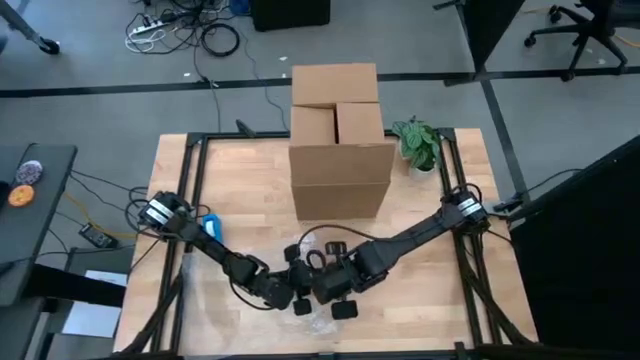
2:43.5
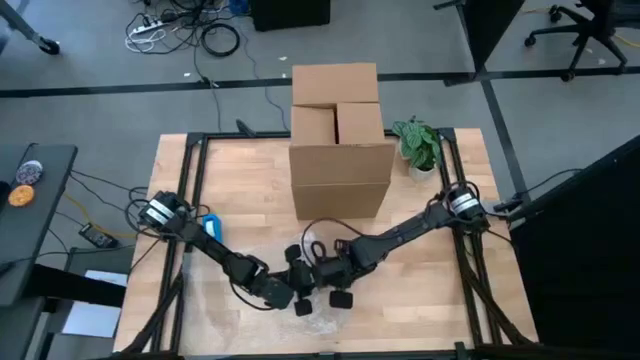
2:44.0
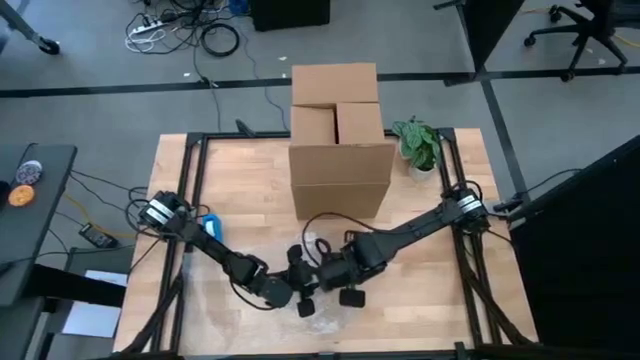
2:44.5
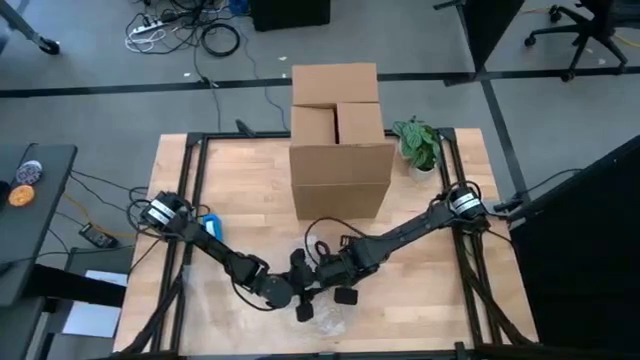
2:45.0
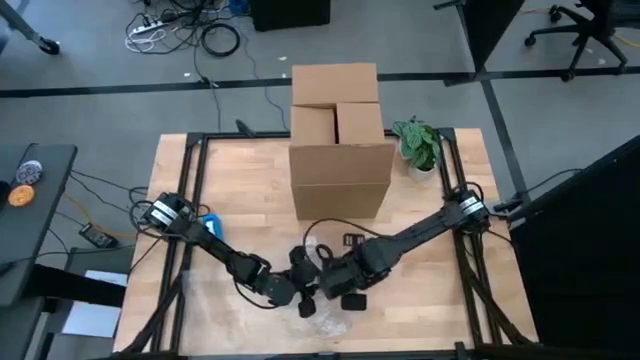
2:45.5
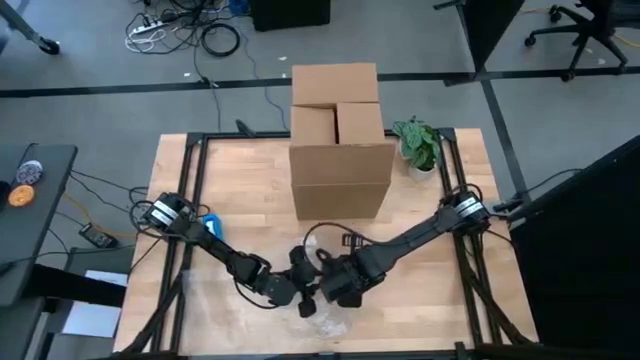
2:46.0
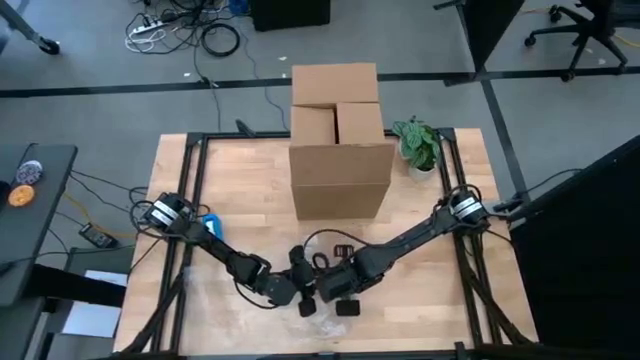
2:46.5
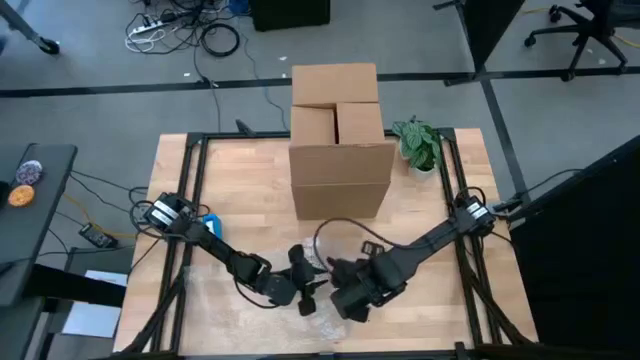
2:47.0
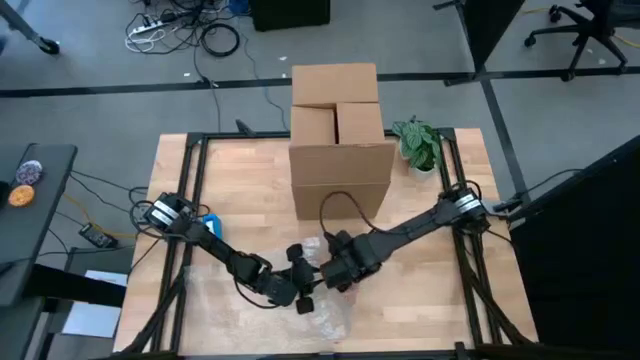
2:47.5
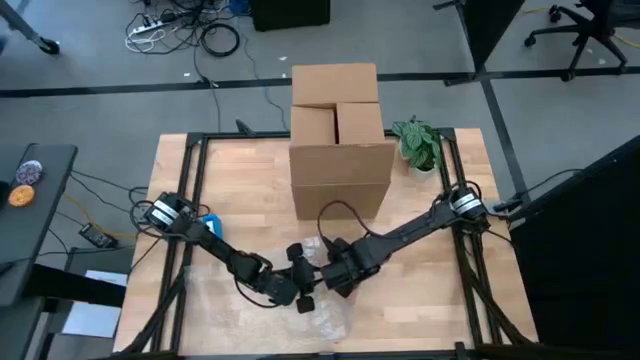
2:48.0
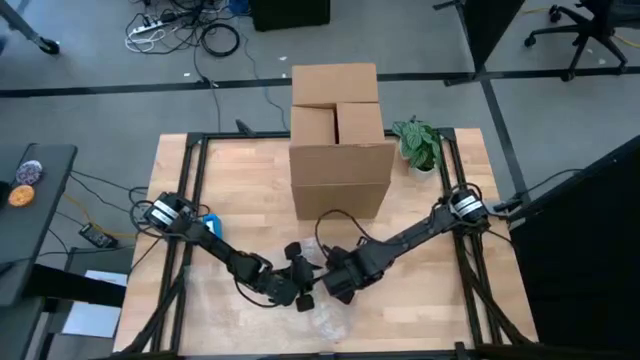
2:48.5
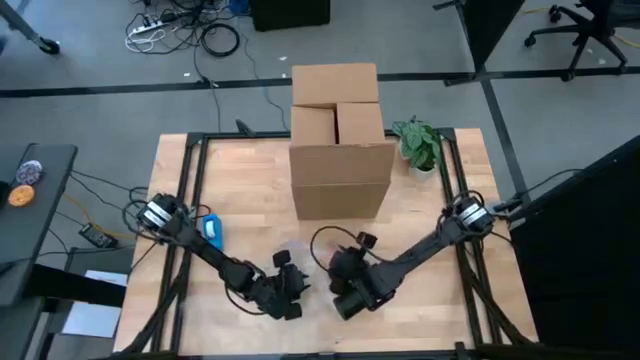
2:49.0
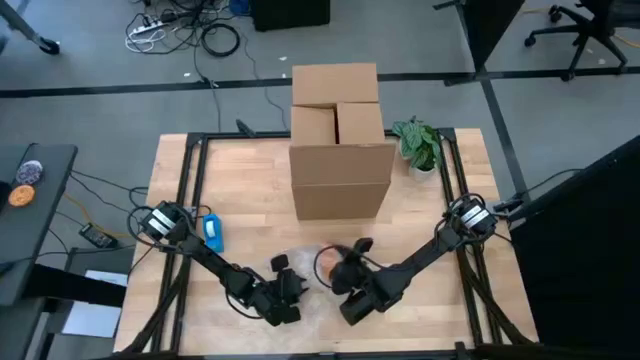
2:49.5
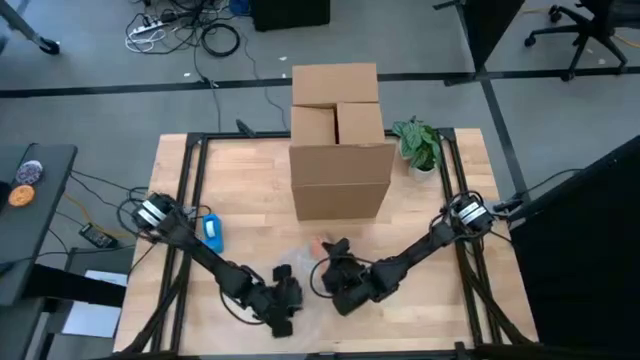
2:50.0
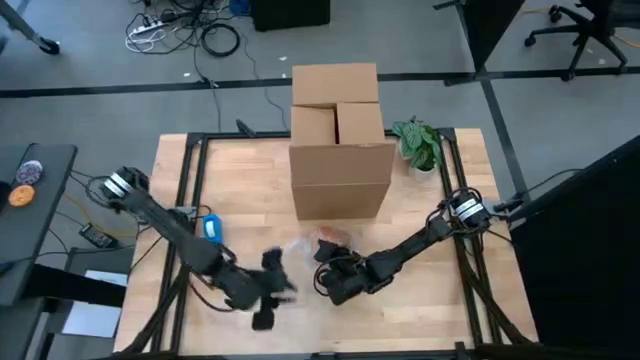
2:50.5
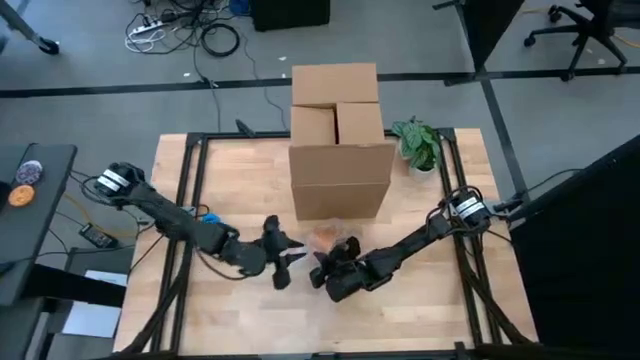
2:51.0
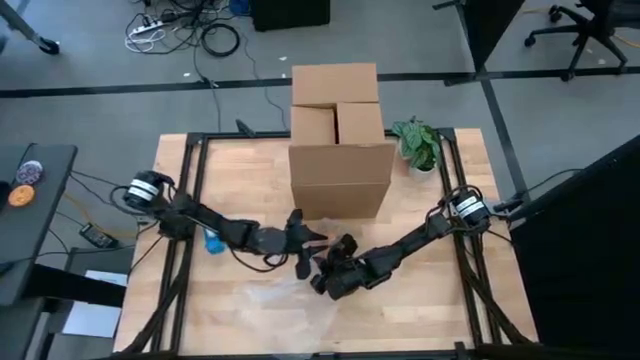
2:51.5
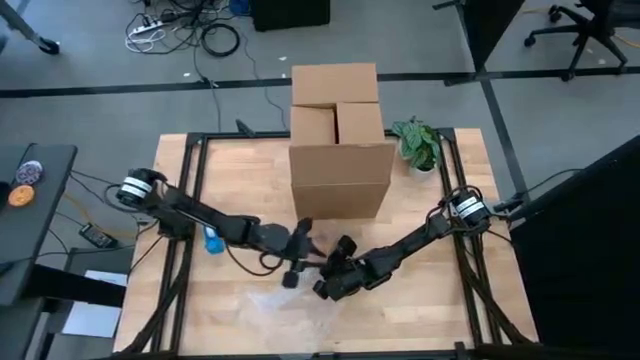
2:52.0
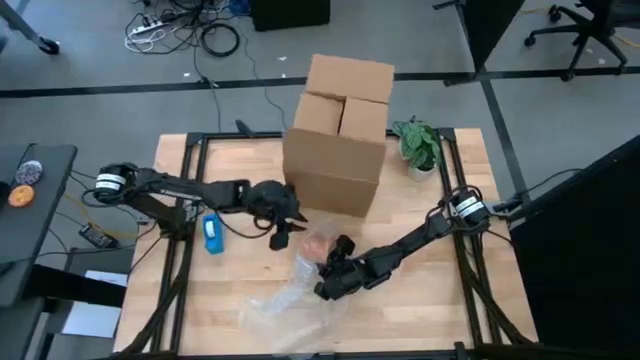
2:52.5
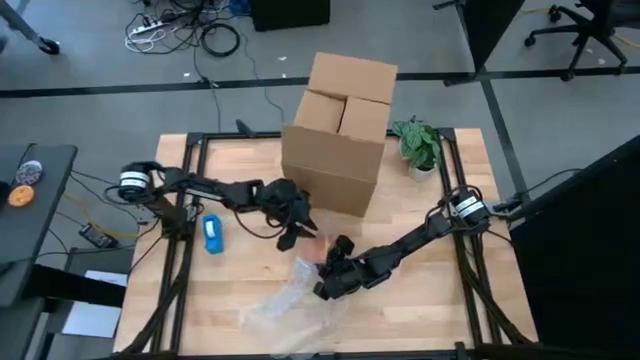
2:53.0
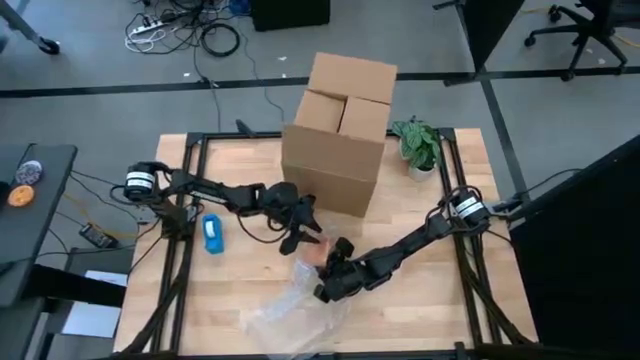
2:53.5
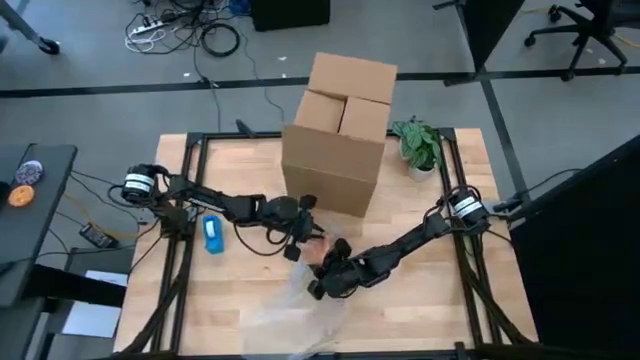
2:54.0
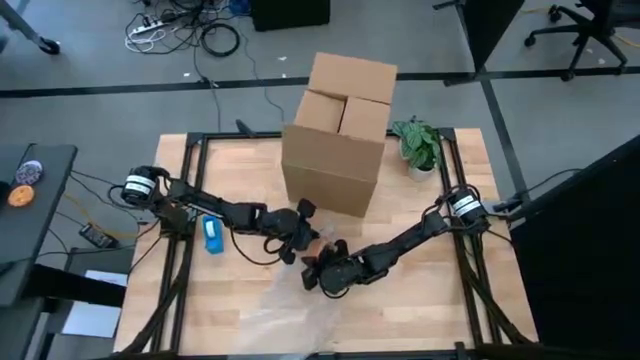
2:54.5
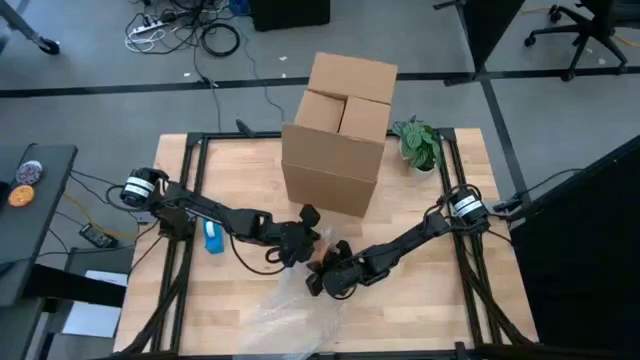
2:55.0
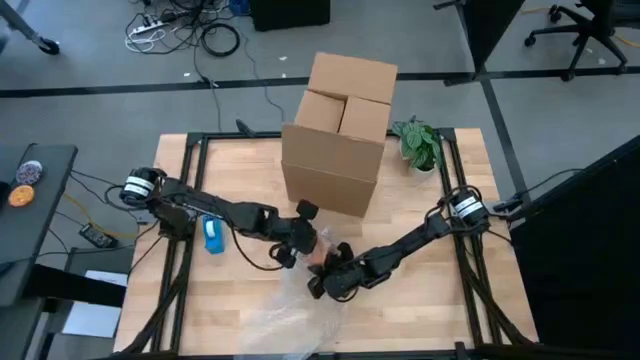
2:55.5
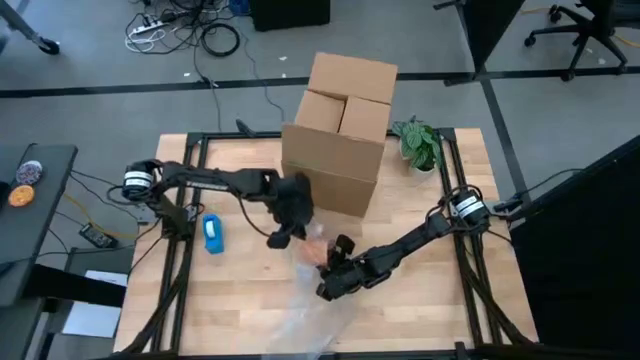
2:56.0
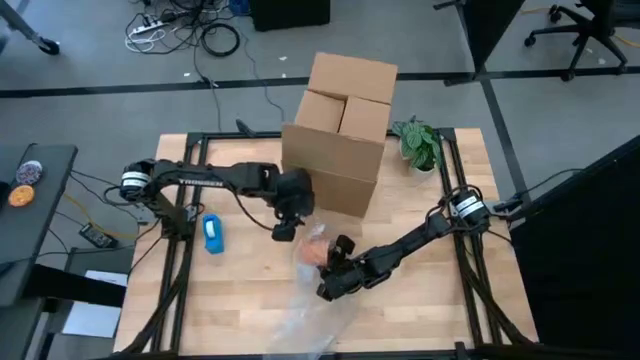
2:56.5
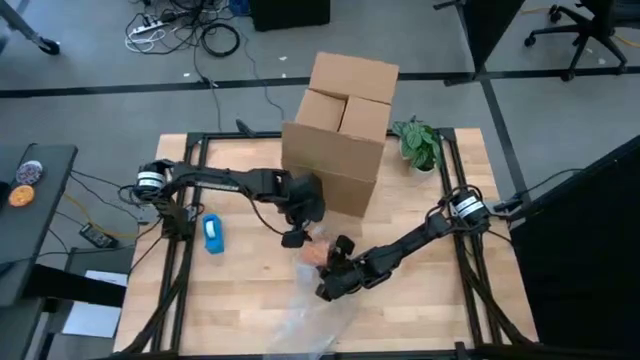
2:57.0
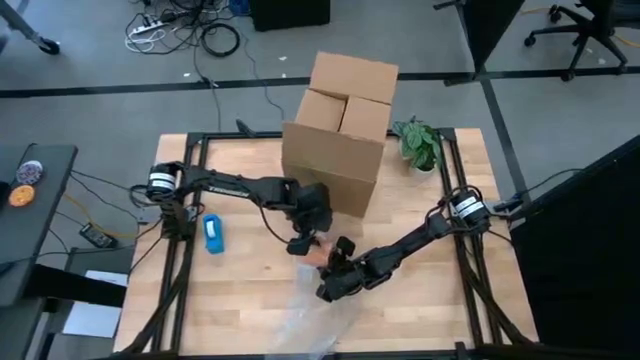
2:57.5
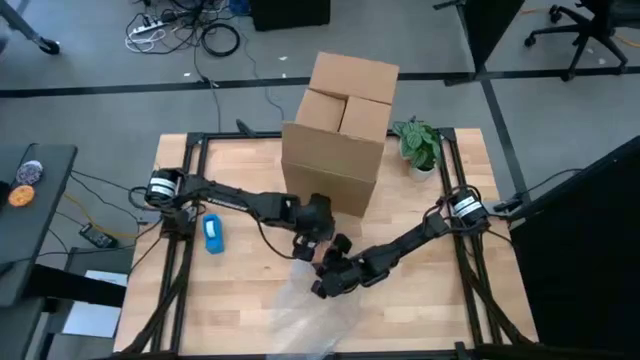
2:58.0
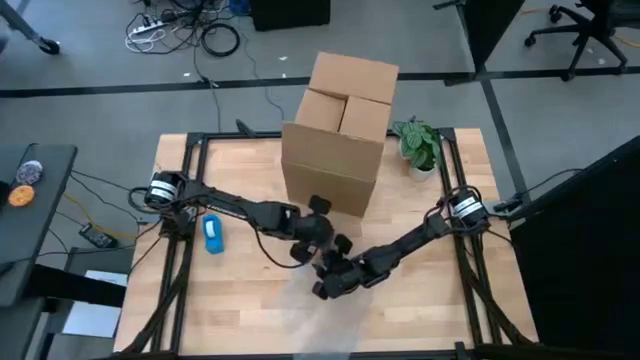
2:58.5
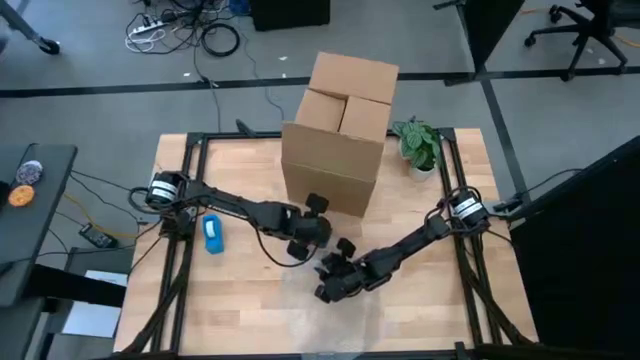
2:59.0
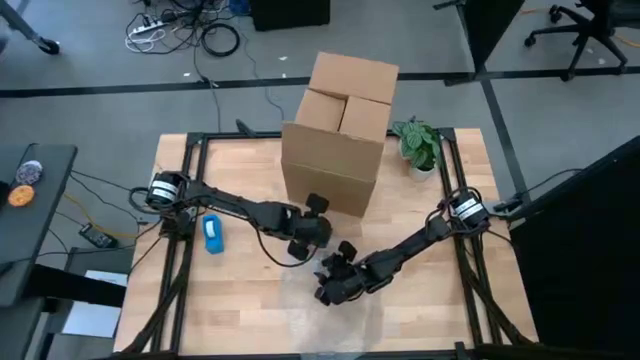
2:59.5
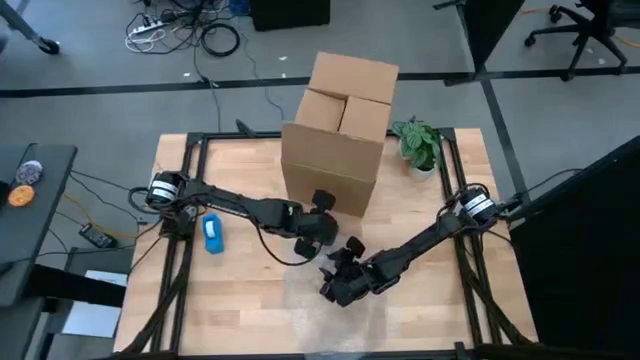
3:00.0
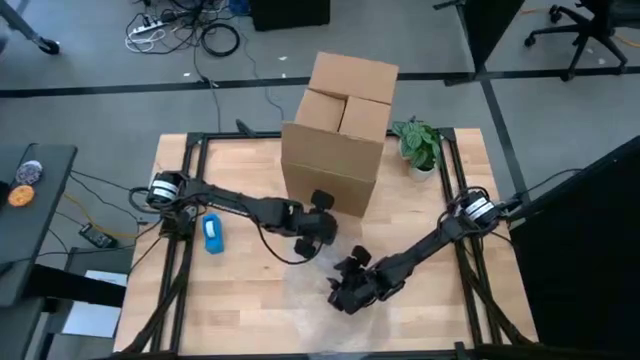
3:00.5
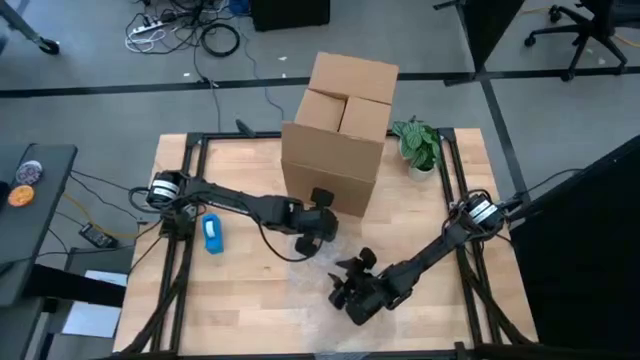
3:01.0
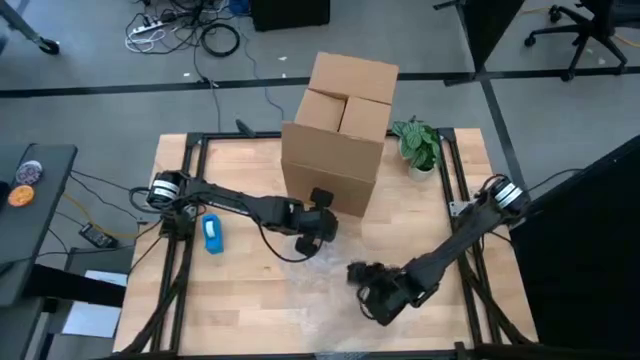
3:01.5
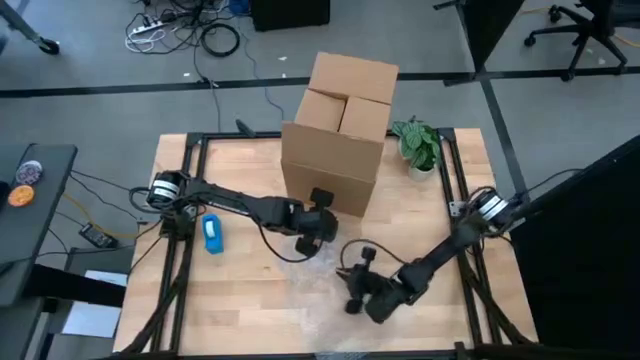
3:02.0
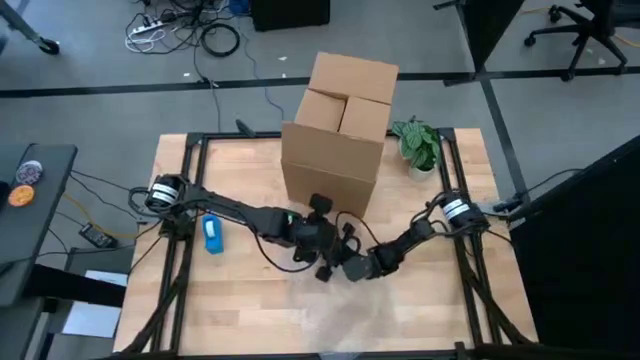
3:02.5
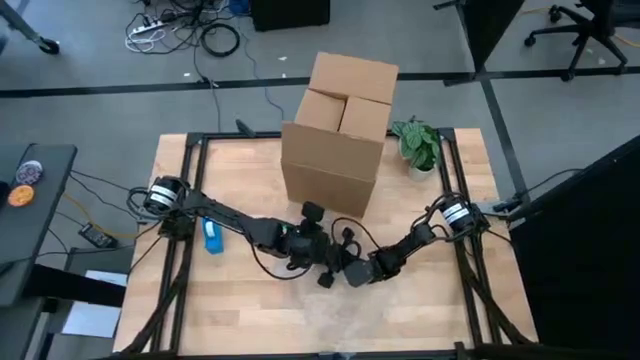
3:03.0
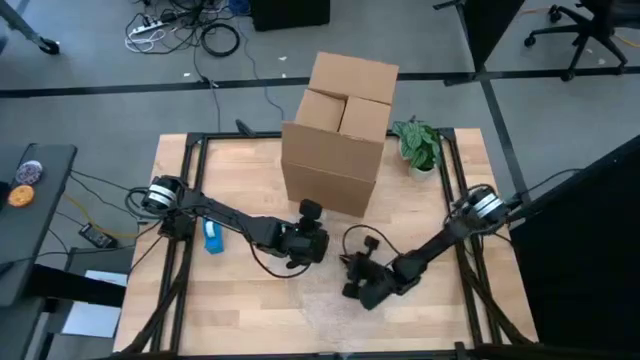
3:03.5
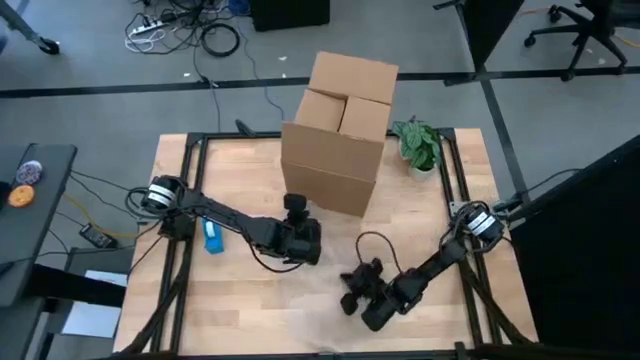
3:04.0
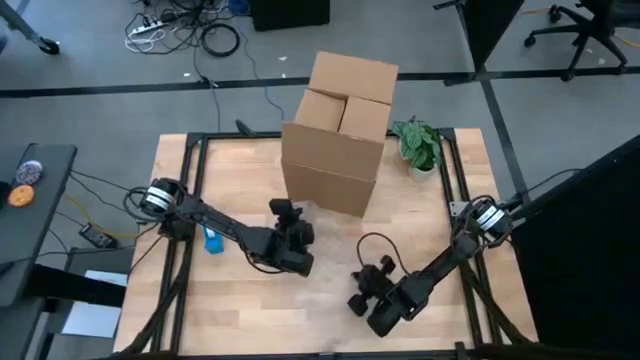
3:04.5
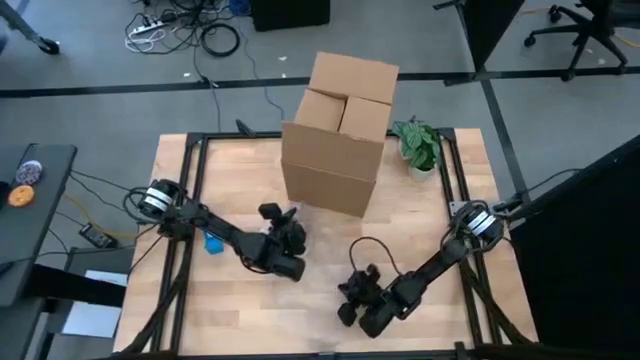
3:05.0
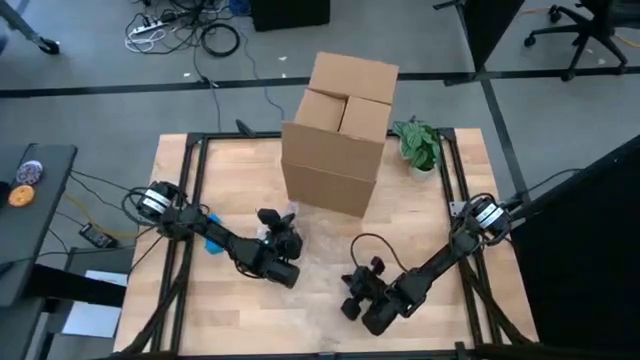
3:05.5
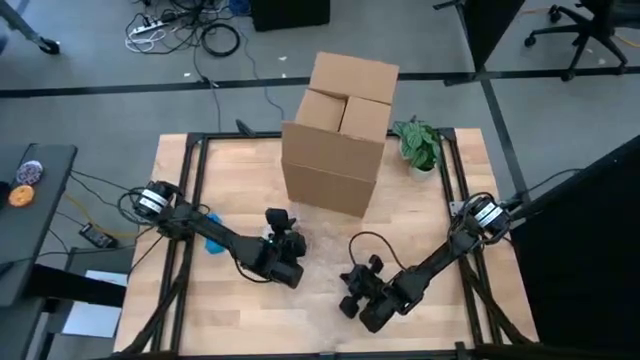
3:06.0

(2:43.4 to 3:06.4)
Task: wrap mug
Wrap the orange mug using the transparent bubble wrap
